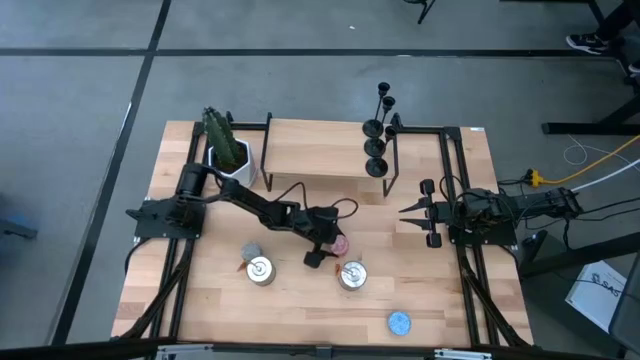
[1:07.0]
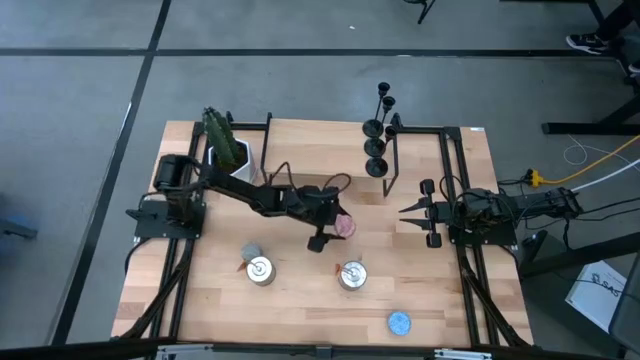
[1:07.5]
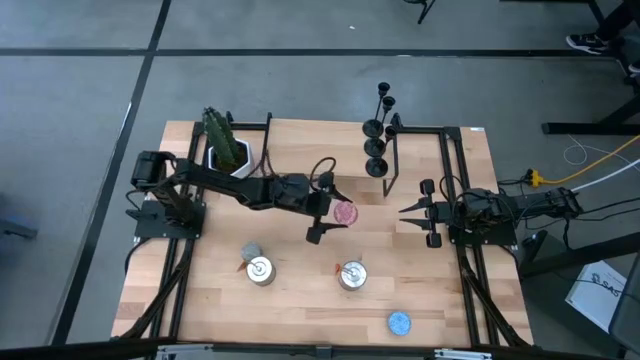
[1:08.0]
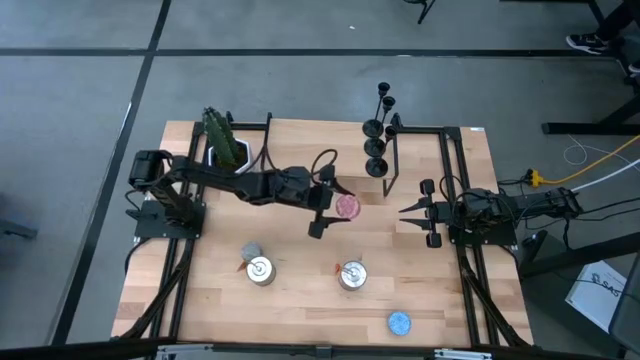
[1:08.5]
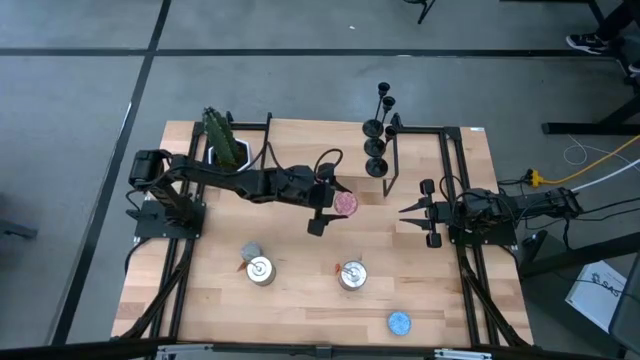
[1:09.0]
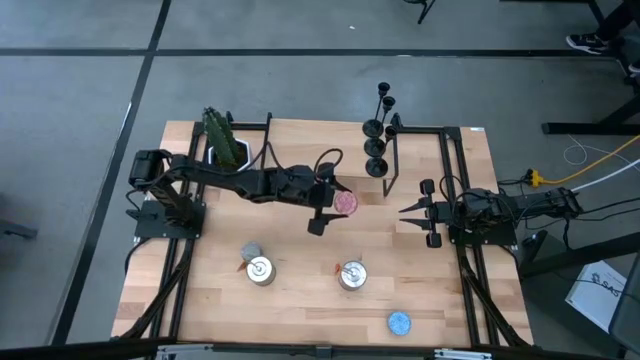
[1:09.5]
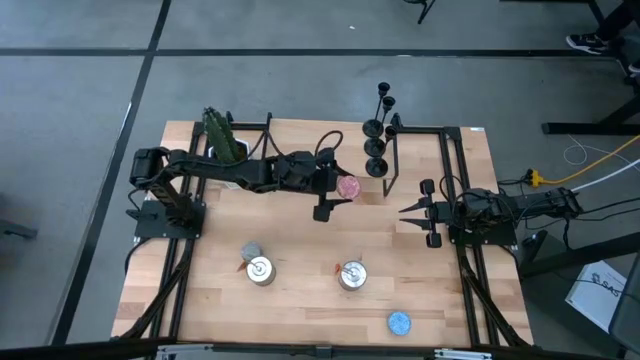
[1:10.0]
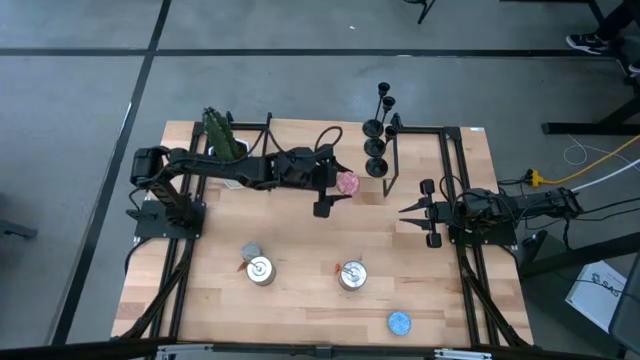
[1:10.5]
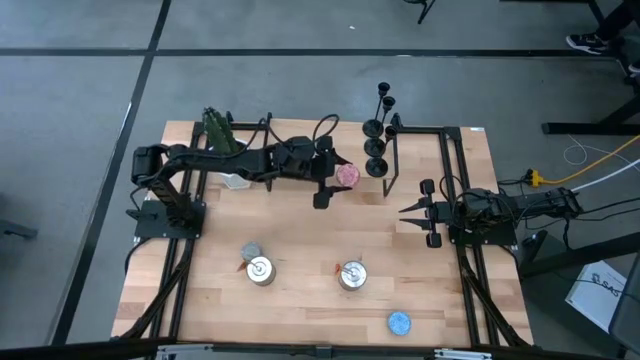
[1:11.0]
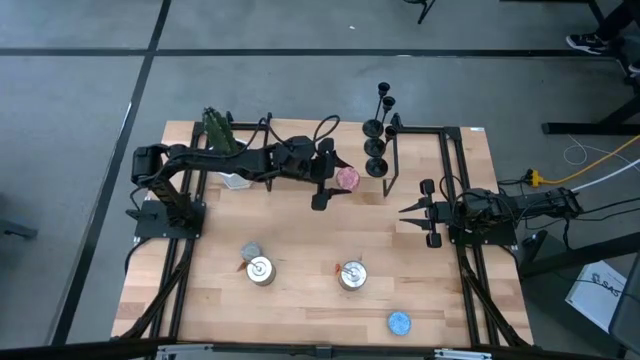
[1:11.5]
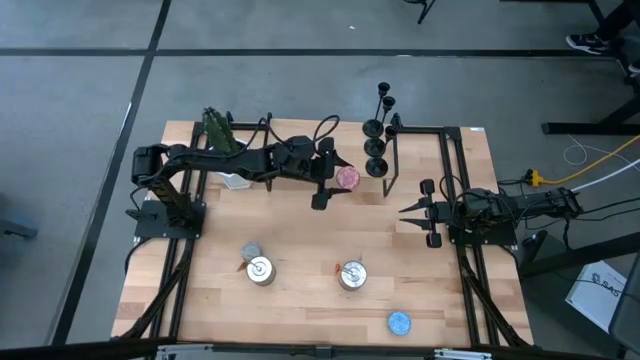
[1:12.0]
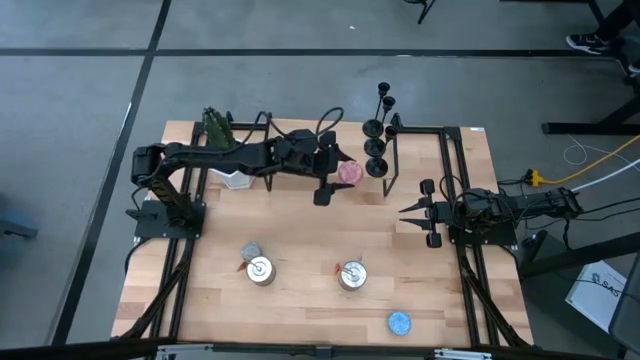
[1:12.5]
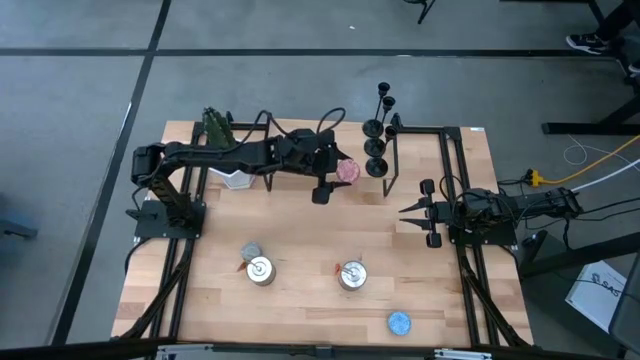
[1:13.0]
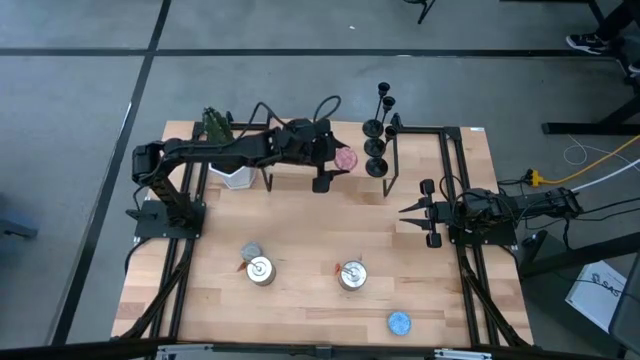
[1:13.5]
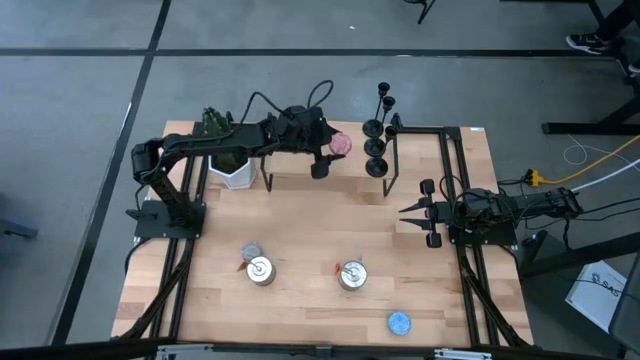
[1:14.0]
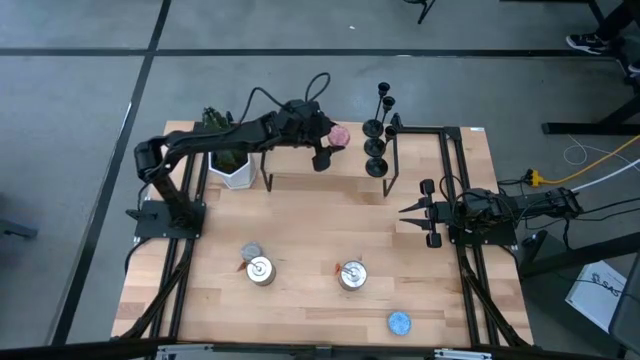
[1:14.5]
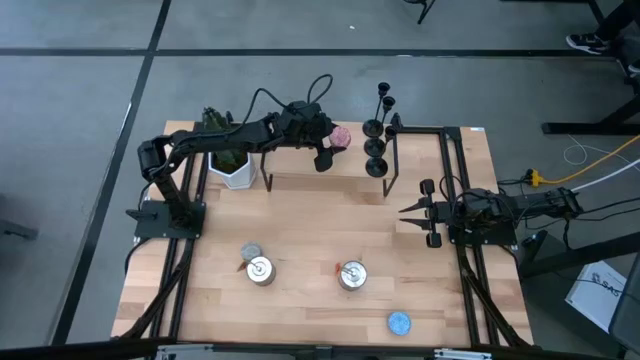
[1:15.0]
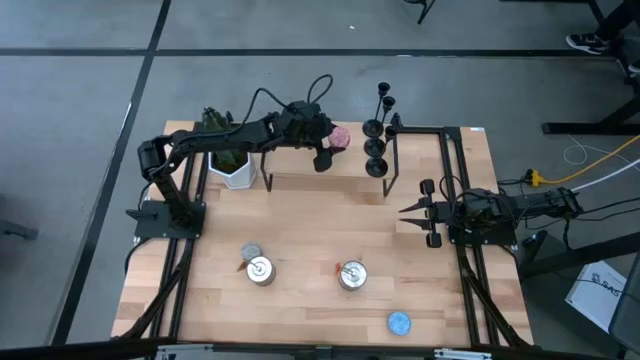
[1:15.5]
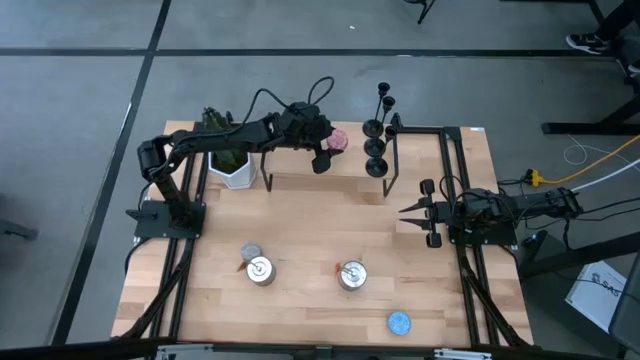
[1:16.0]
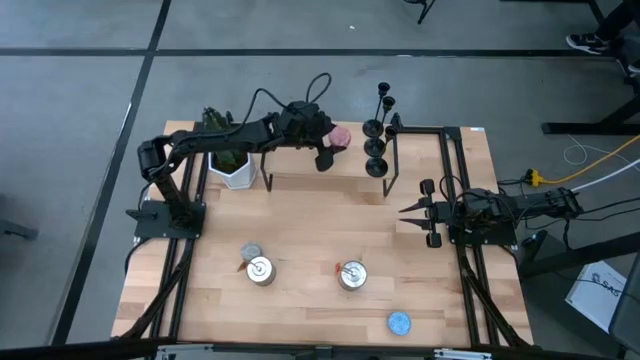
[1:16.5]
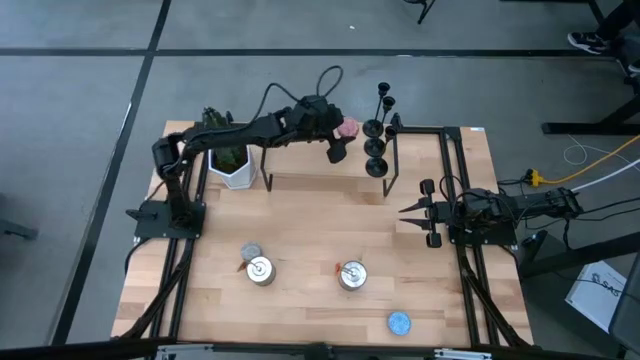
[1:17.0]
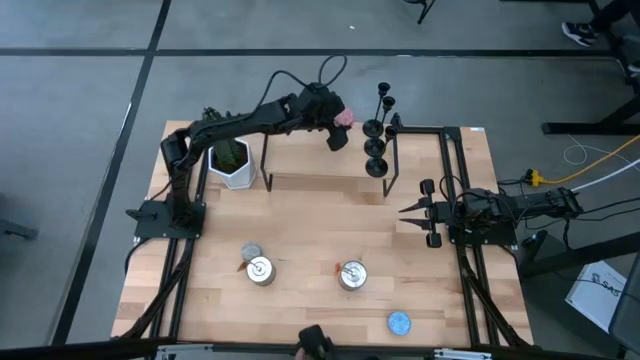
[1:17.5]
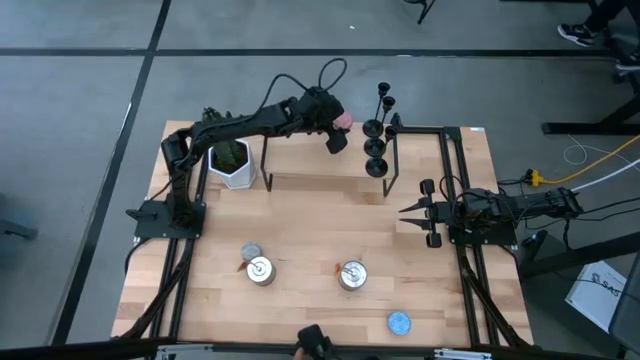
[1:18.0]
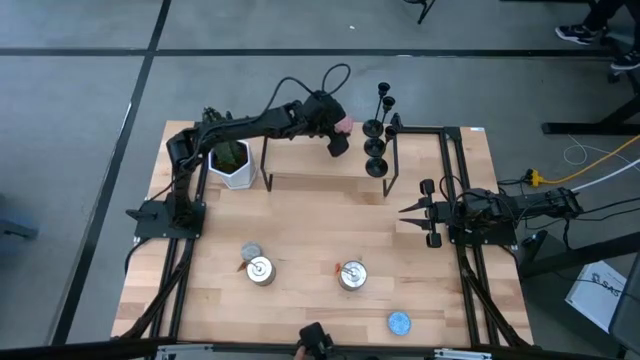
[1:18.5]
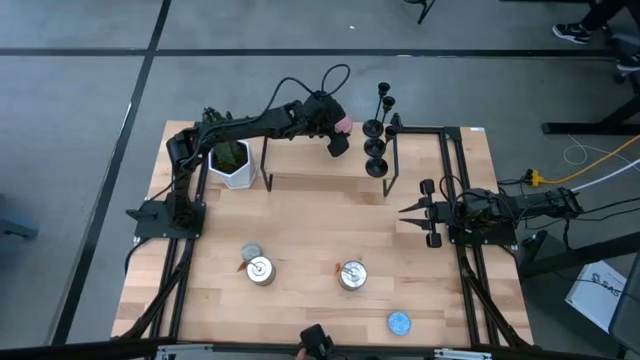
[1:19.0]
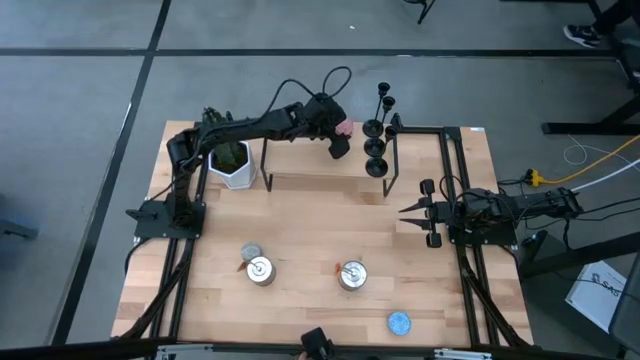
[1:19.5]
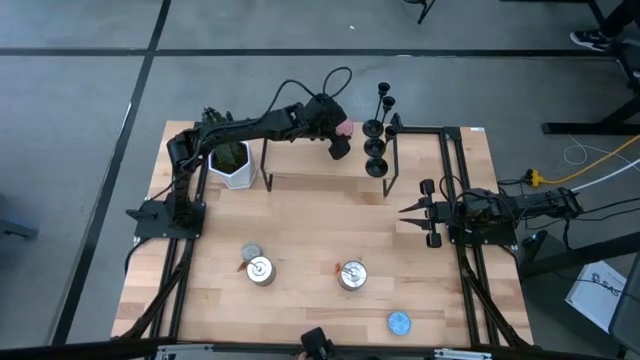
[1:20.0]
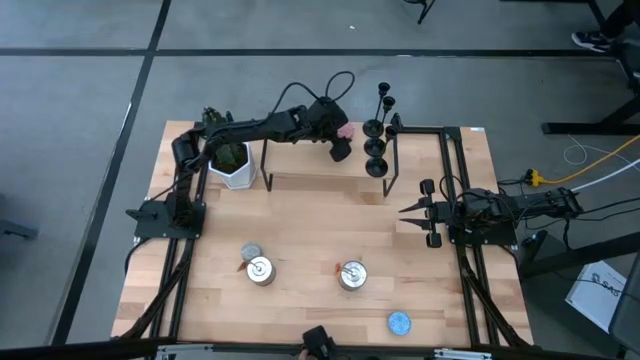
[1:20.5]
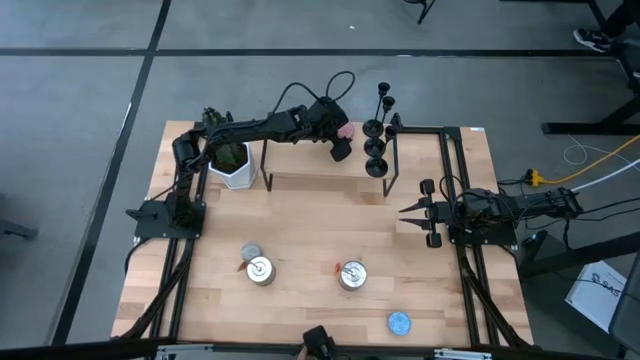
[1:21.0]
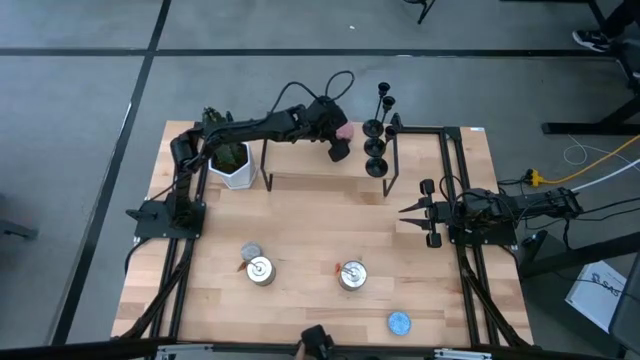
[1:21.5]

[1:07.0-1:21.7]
Task: Pick & Place candle stick holders
Put the pink scented candle on the shelf

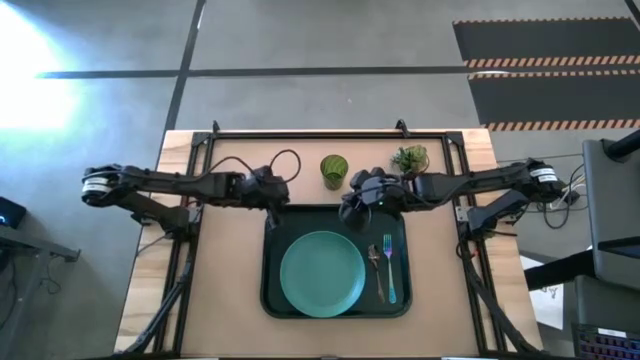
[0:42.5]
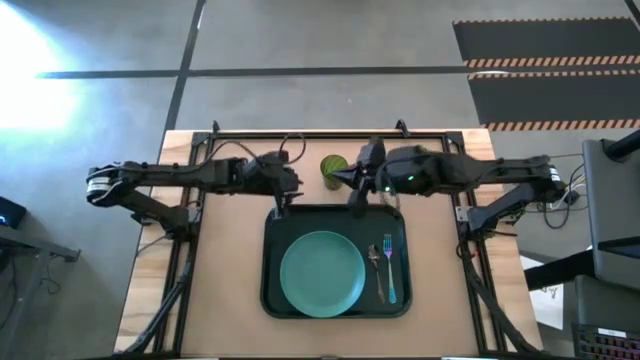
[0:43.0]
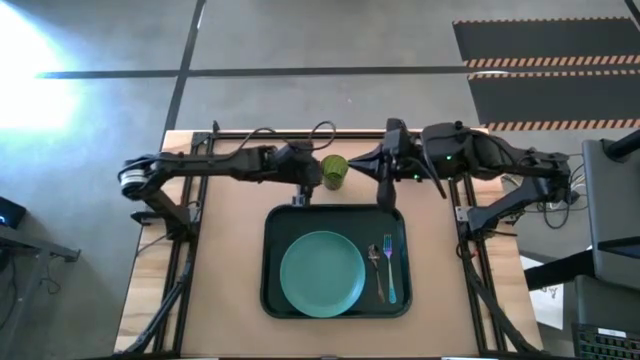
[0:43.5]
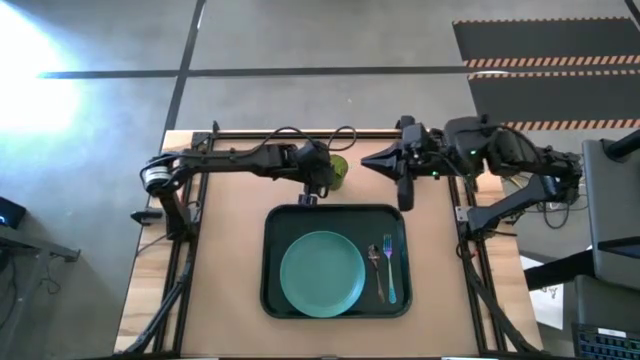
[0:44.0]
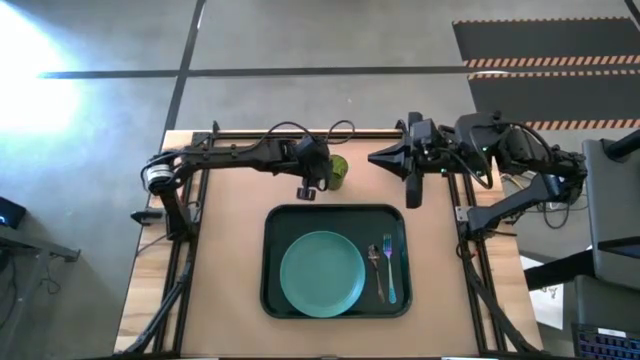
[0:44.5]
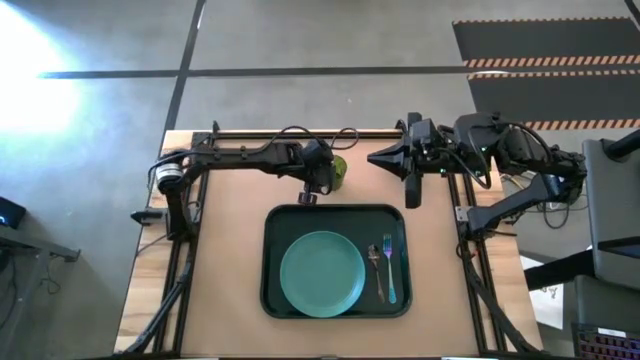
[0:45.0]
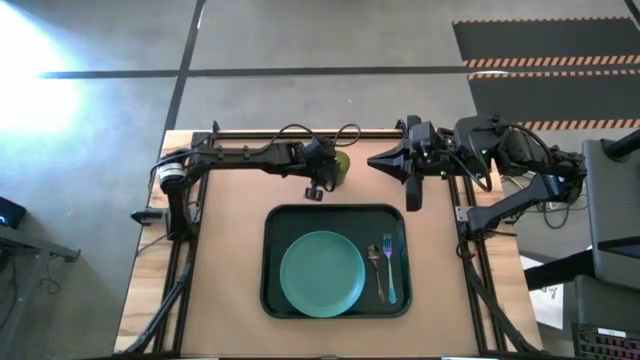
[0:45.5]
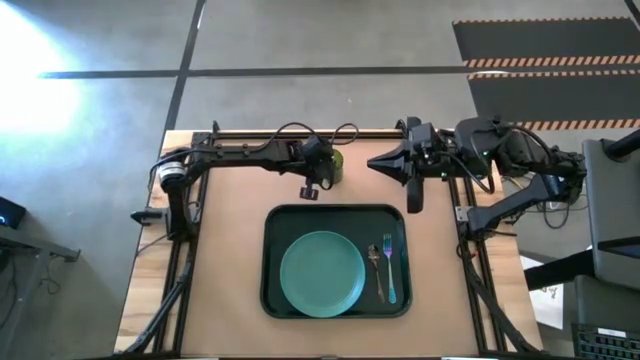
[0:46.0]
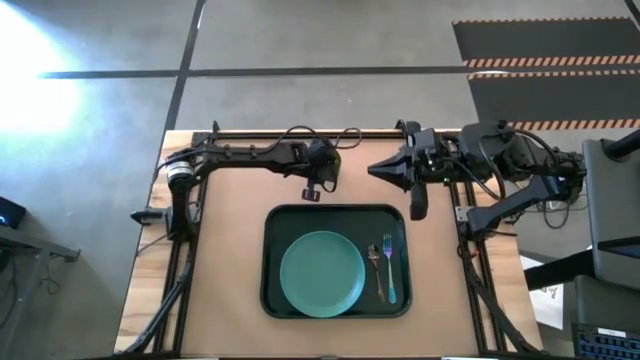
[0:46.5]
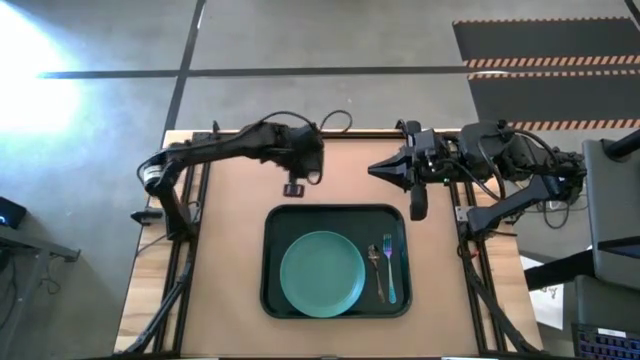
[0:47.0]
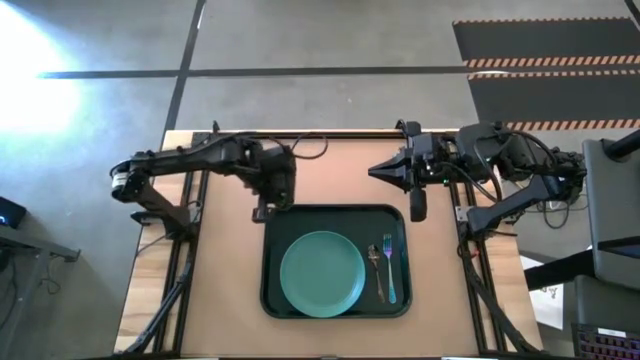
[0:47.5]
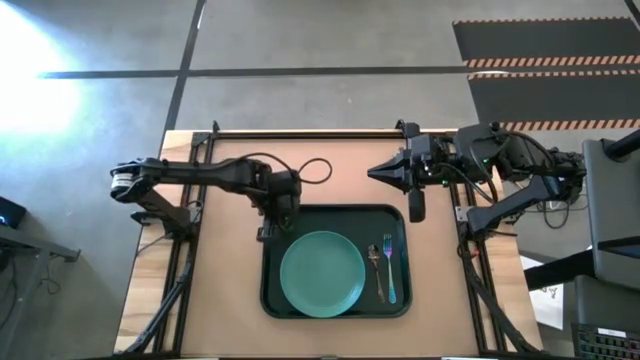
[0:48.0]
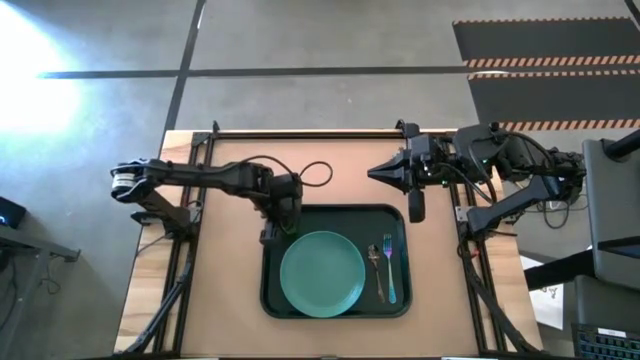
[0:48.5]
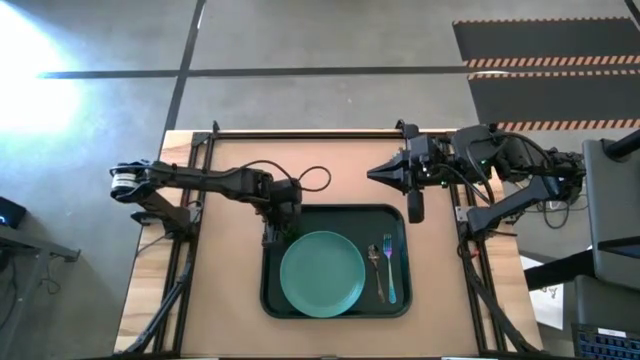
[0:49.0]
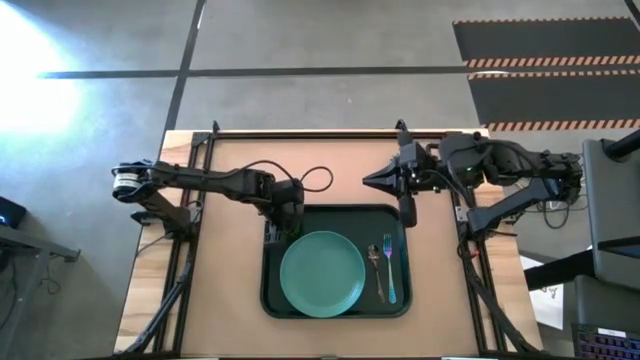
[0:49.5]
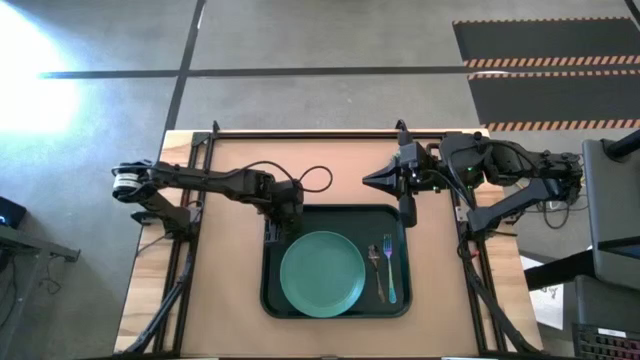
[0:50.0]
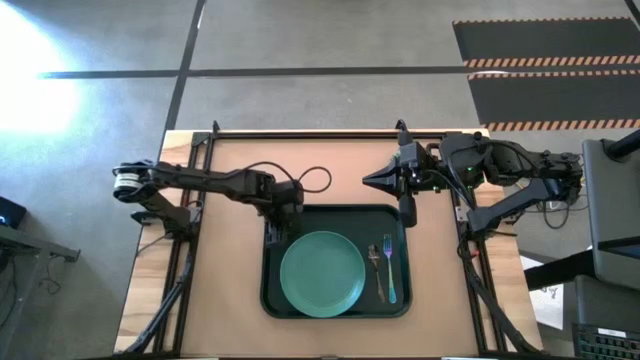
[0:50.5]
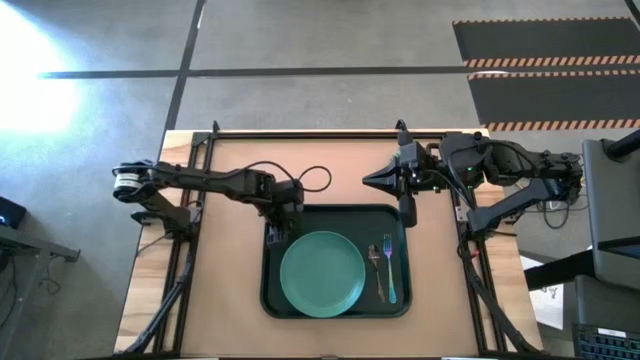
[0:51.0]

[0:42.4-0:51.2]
Task: Pick and place plate/cup/fork/spoon on tray
Put the drinking glass on the serving tray on the top left of the blue plate
